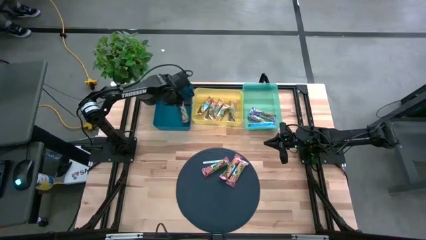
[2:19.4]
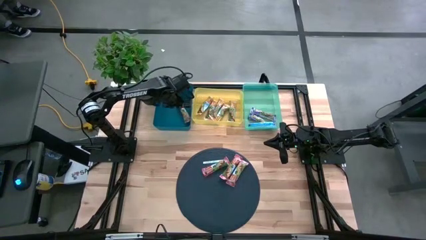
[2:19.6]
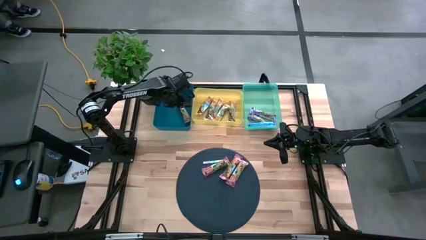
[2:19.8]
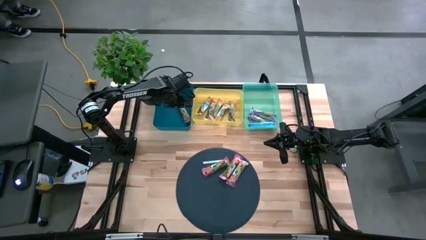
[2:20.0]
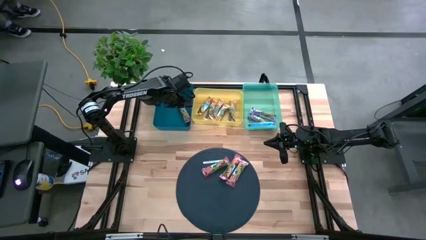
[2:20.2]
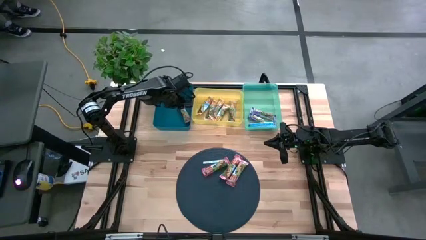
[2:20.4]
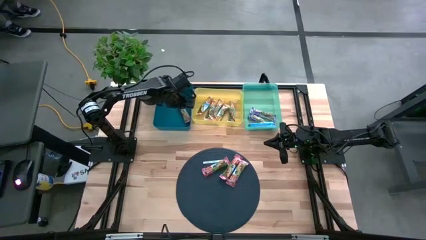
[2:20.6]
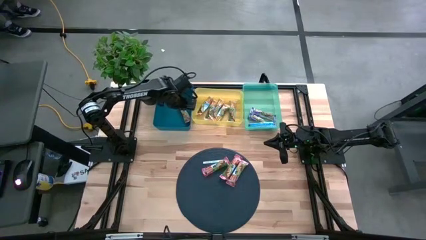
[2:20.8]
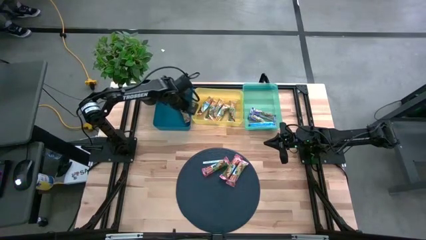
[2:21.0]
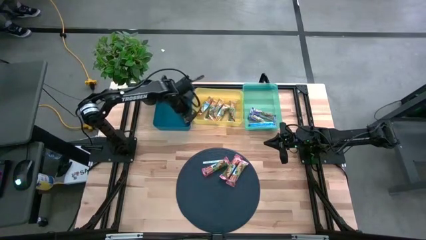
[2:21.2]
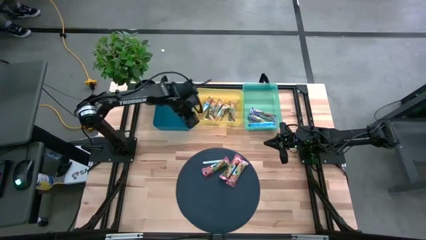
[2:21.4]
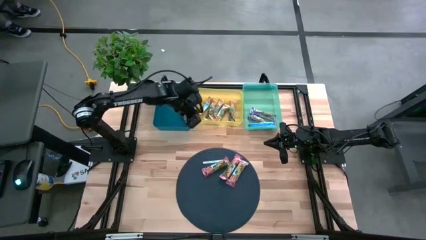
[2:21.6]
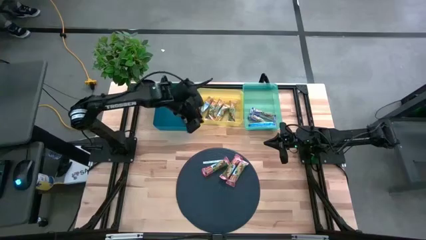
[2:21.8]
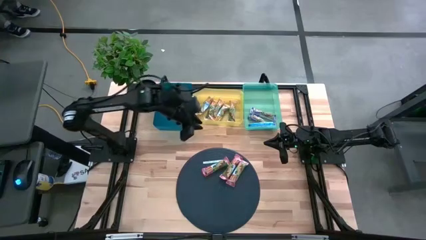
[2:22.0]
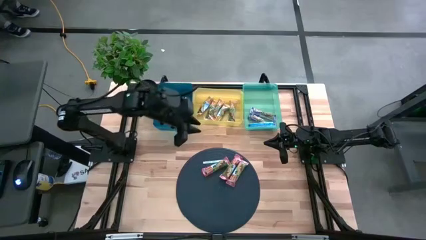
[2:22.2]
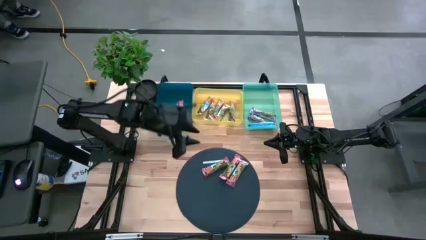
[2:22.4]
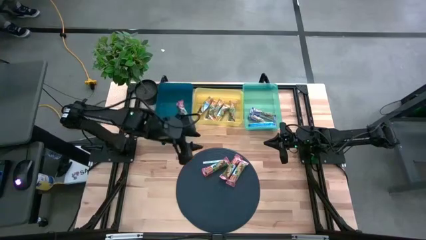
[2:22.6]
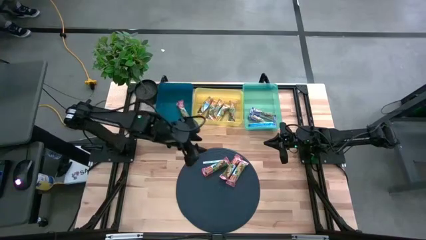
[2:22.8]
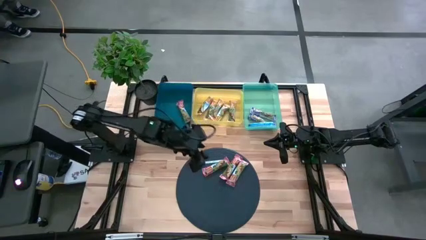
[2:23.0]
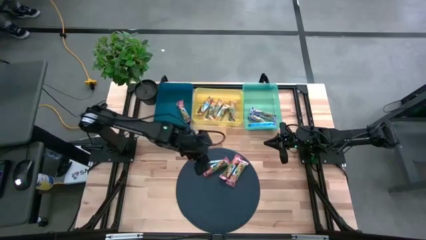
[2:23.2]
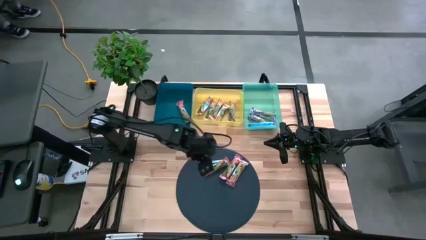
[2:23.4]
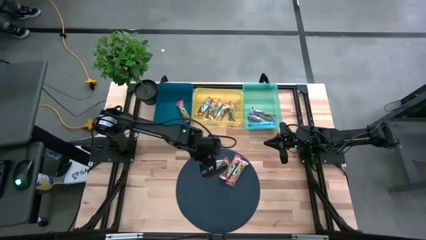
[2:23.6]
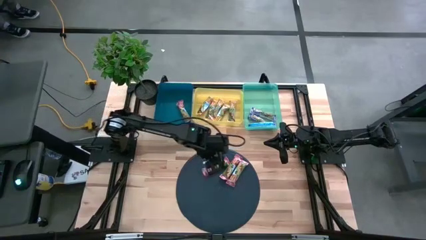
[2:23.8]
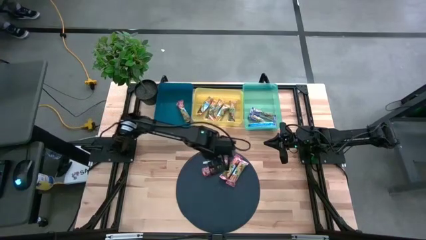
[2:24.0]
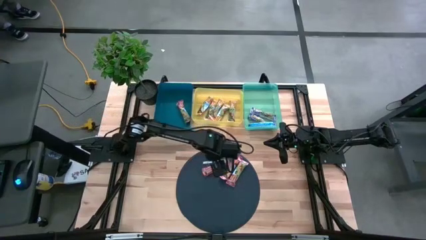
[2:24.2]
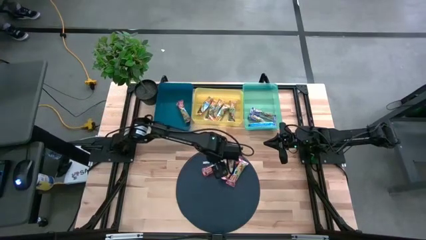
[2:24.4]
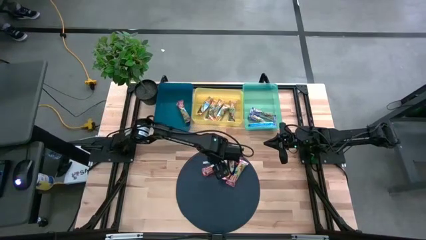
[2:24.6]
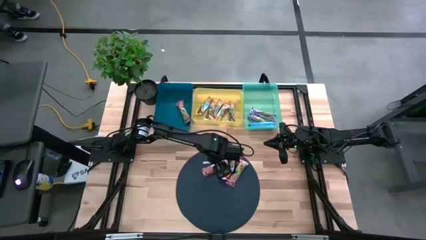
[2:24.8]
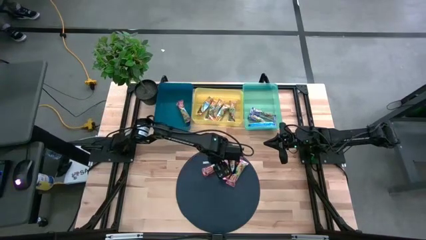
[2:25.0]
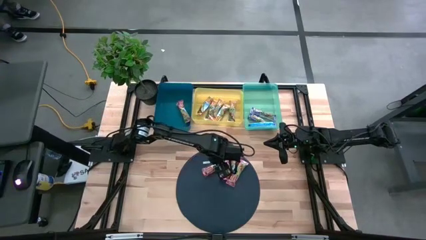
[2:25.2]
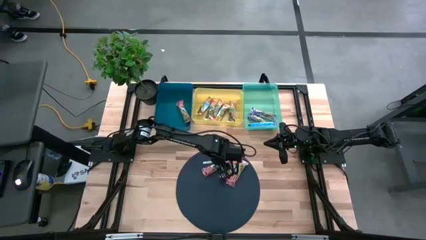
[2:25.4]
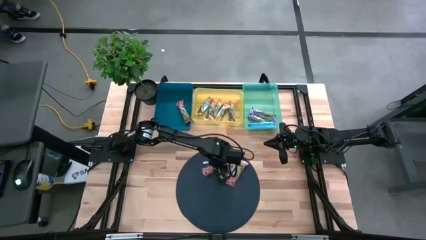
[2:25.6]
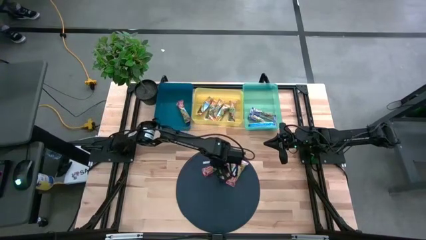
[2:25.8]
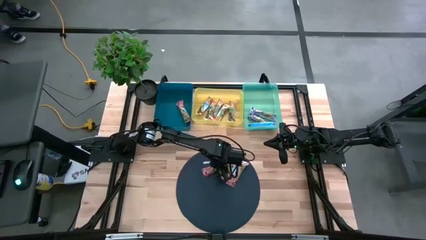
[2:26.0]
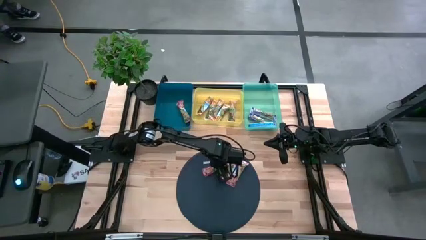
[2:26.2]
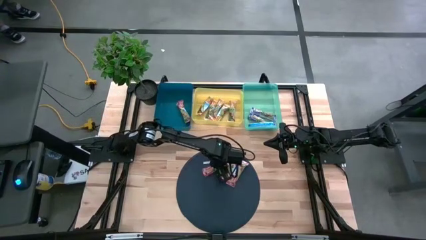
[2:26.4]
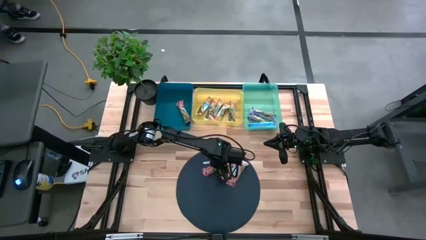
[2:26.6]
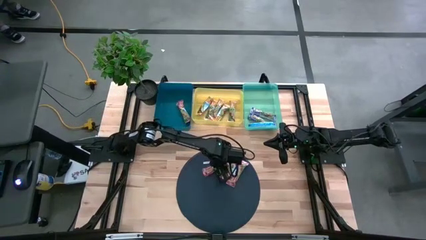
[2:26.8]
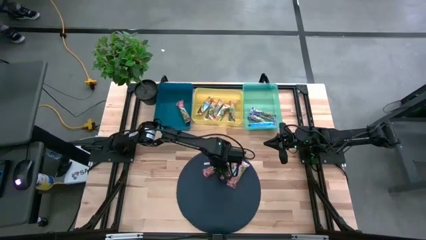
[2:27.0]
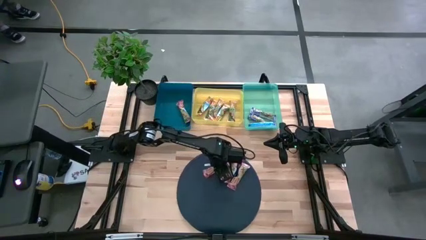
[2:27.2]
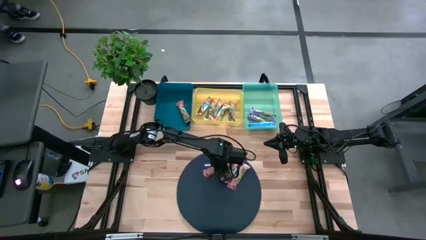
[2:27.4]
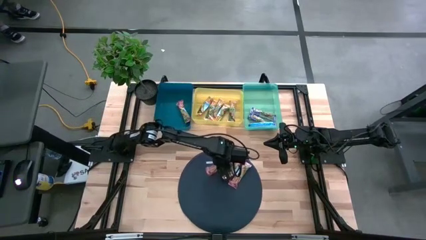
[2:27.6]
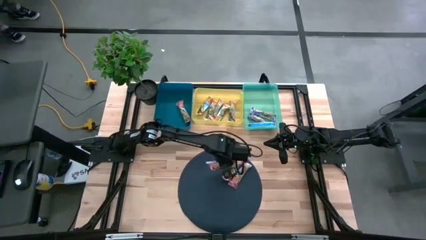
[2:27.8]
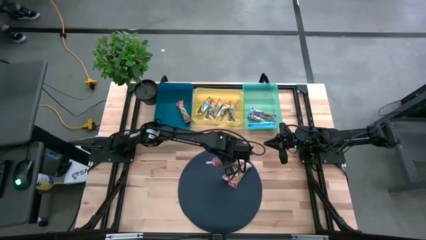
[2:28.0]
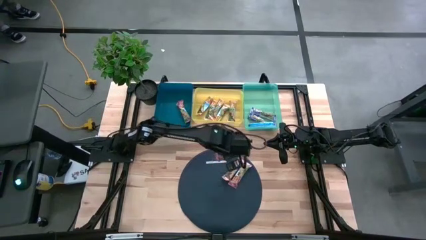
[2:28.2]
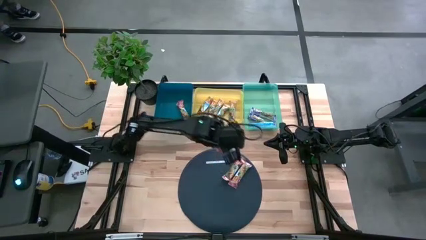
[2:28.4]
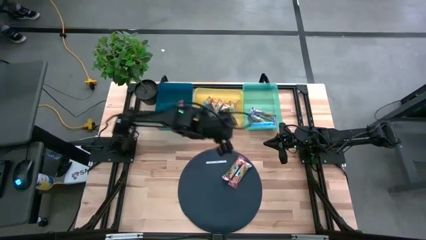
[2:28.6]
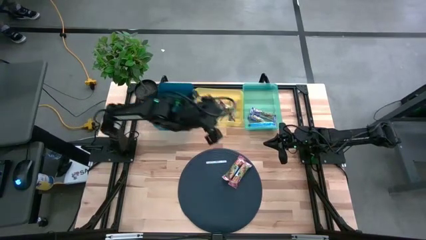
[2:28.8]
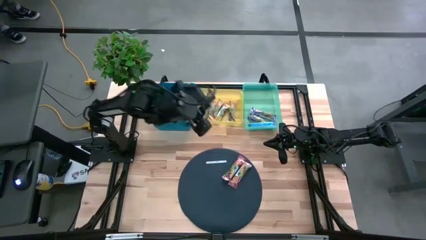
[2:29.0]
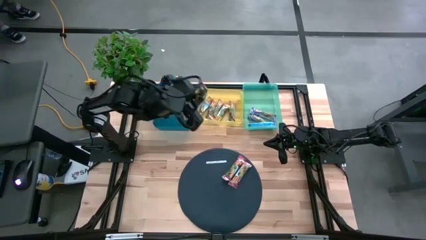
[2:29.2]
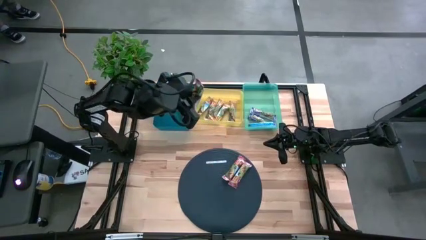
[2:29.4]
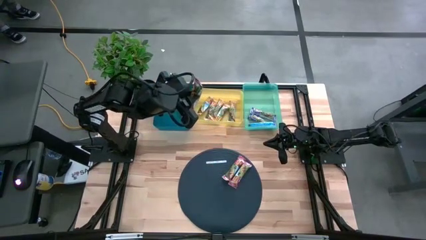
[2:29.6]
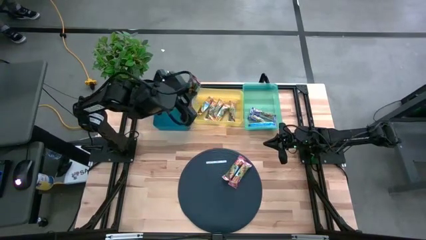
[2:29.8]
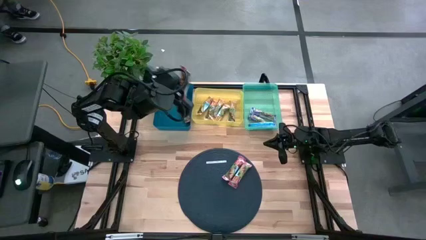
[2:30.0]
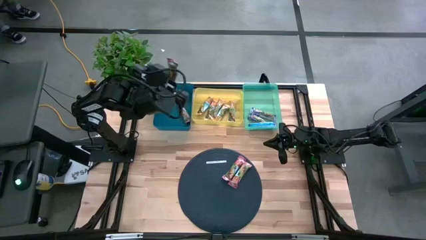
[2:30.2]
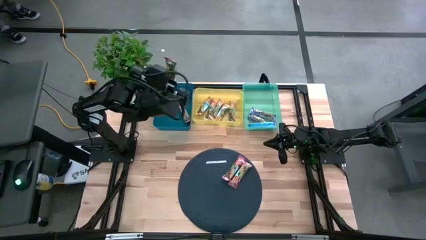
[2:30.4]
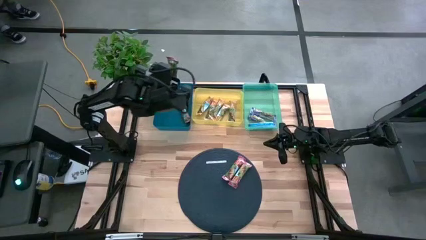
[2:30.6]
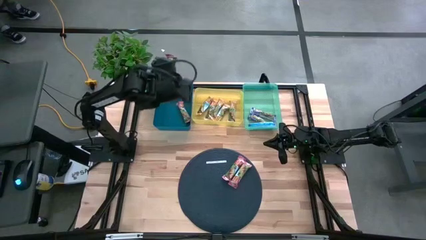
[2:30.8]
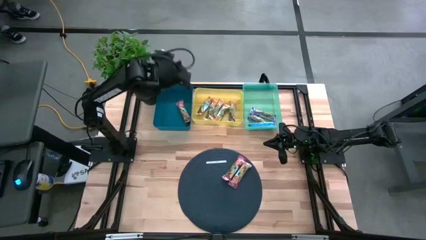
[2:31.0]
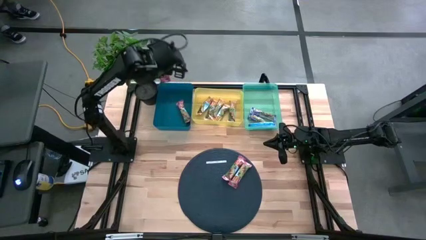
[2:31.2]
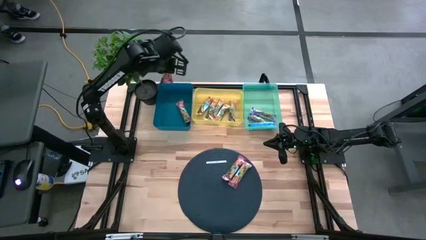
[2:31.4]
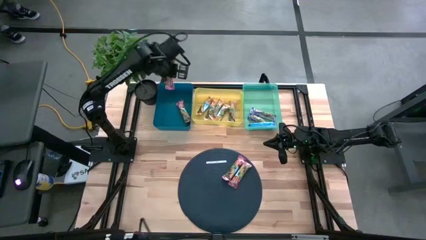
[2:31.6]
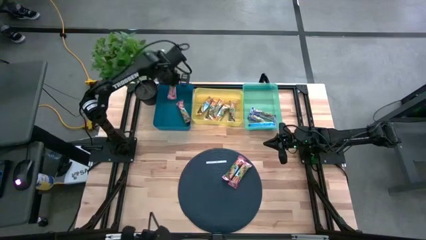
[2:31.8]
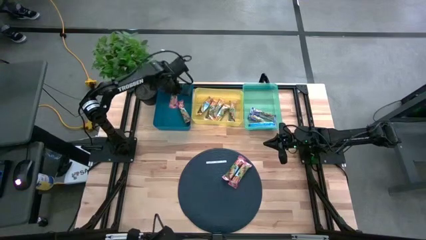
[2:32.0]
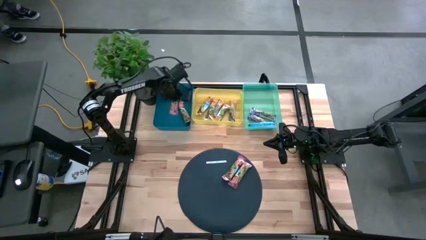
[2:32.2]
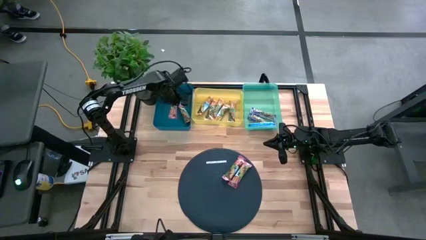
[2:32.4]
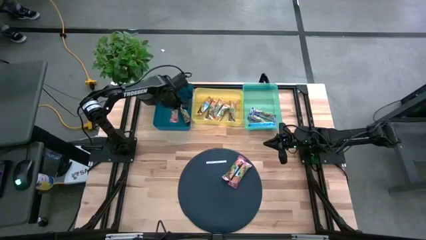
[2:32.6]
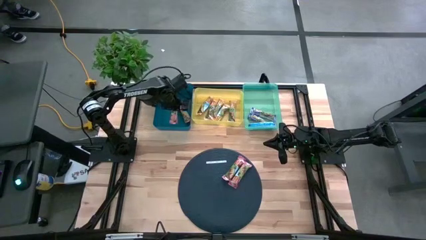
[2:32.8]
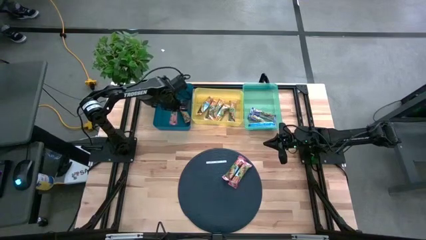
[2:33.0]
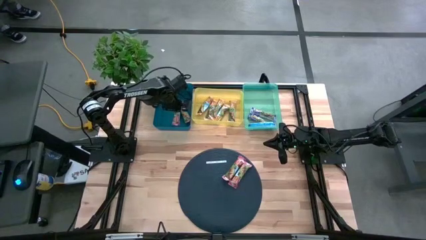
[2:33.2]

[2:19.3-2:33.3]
Task: Pick and place Granola Bars by type
Put the red granola bar into the blue bin

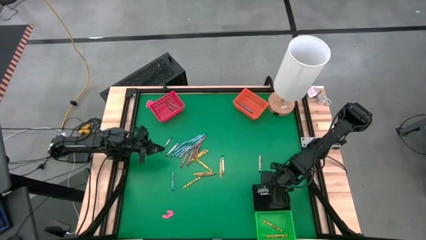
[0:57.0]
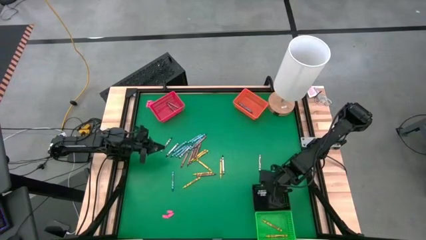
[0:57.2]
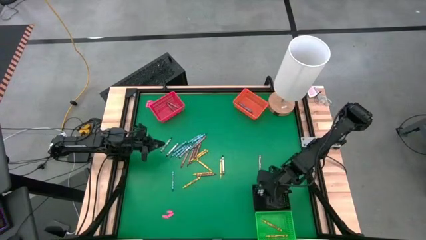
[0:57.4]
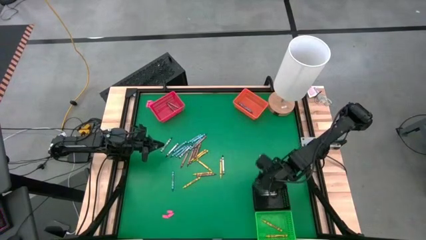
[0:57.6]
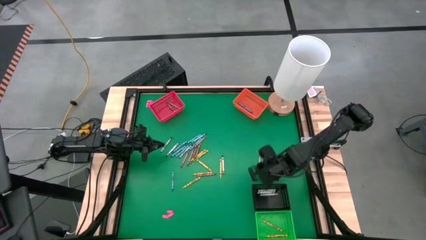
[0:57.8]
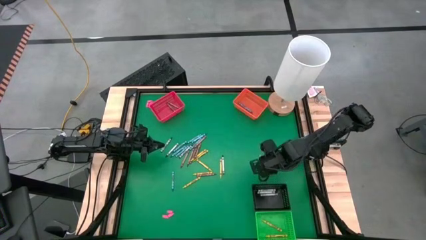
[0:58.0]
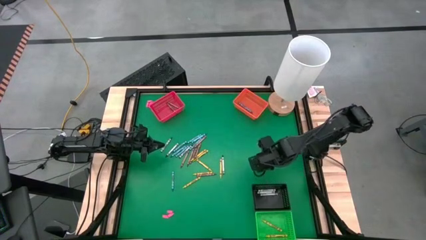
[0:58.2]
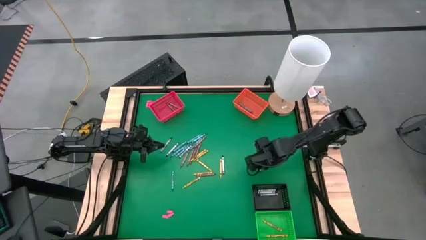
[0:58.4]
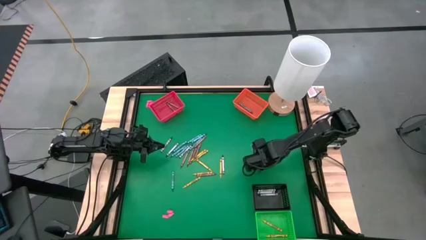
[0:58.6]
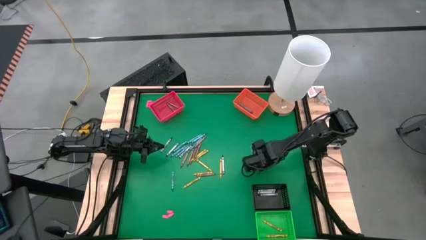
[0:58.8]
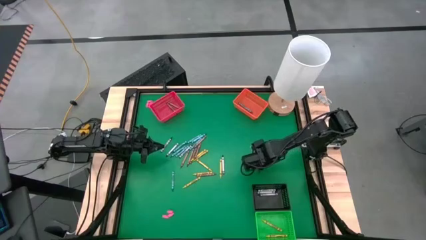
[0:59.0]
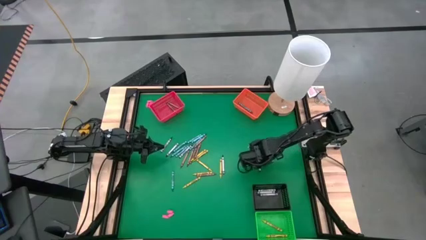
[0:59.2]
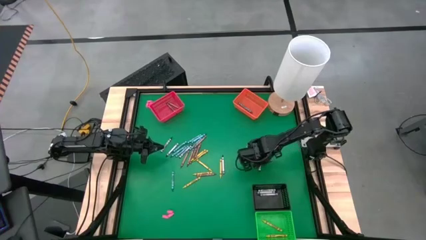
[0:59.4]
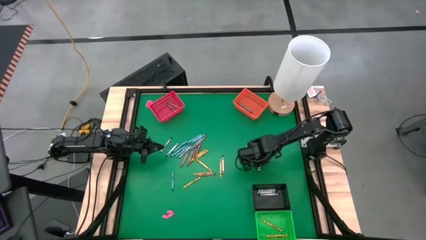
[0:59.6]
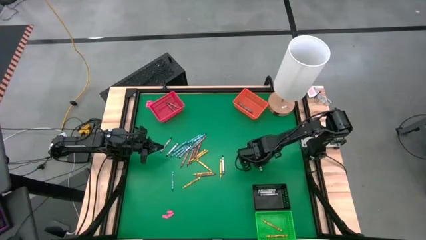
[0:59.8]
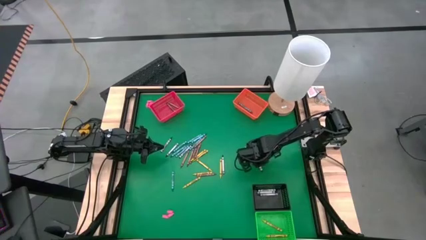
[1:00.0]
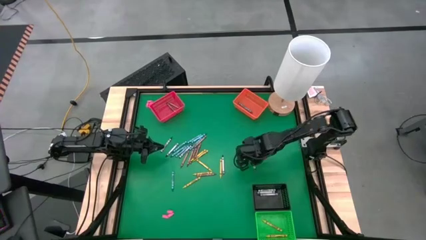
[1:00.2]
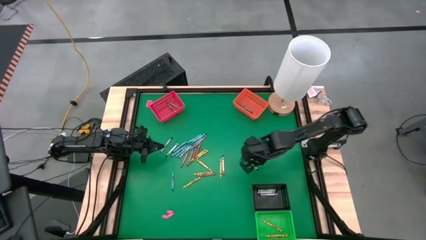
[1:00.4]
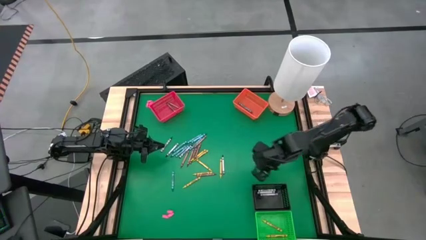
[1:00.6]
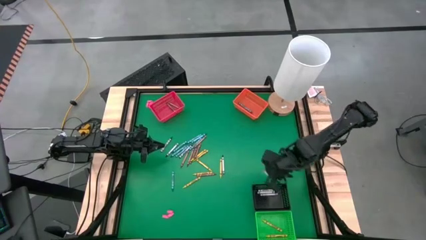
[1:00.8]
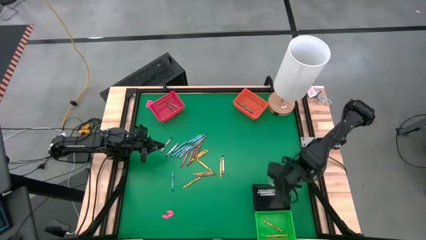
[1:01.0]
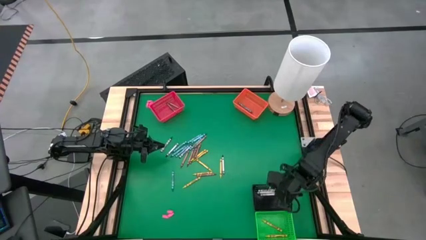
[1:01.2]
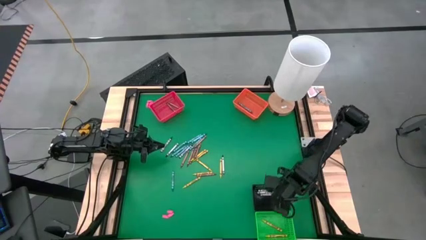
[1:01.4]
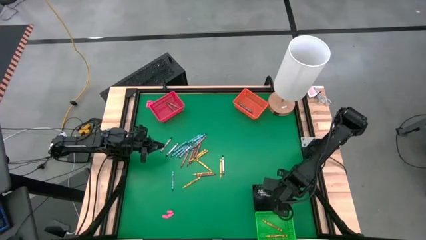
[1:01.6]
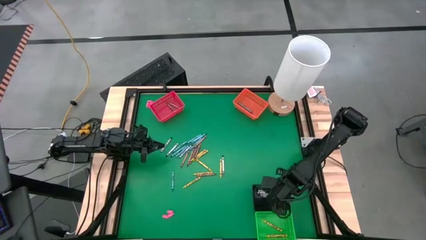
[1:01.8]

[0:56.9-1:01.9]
Task: Sort crayons
Put the black crayon into the black bin
